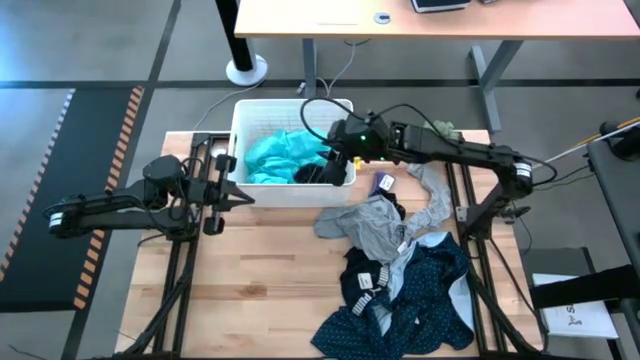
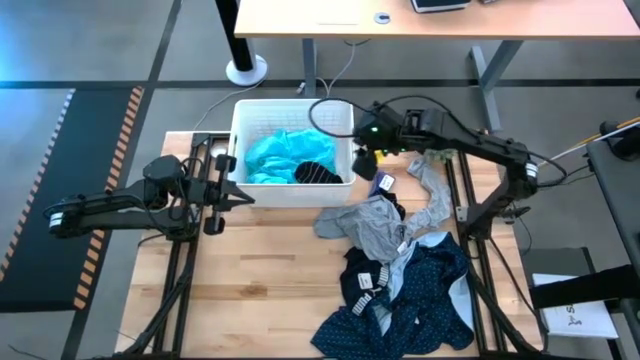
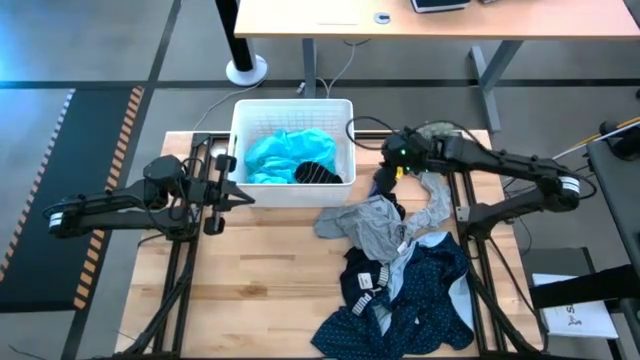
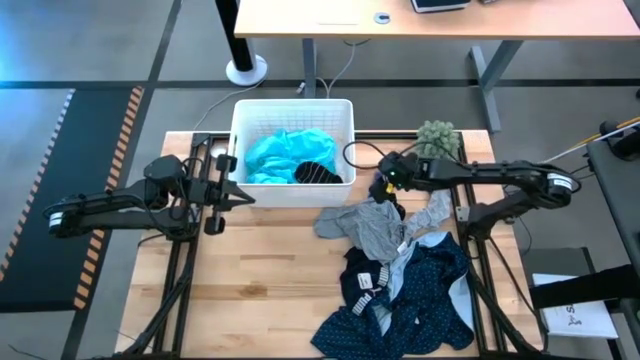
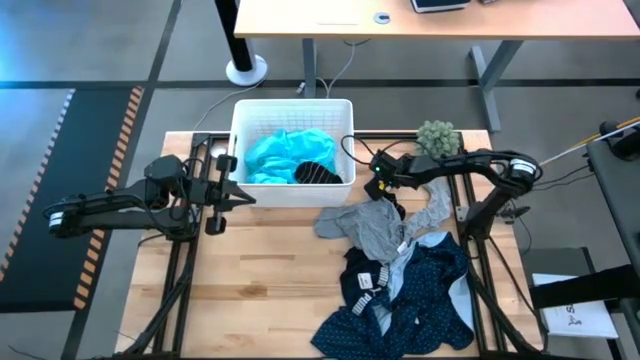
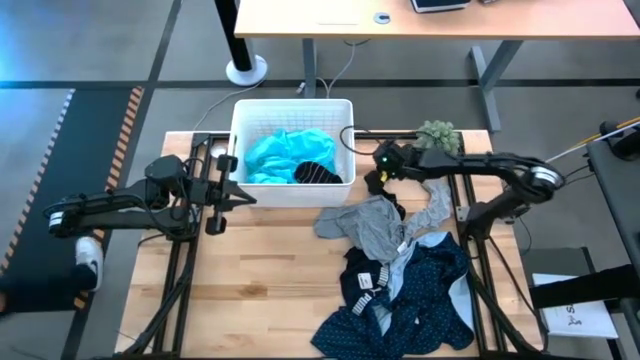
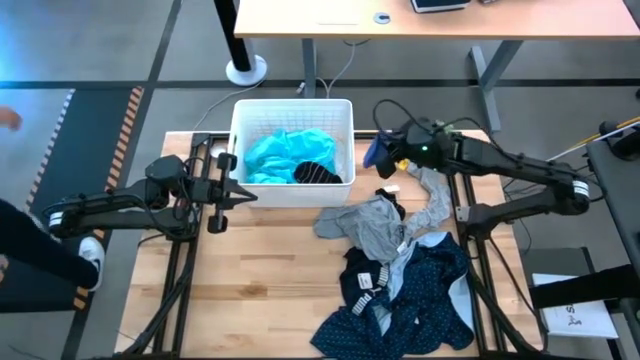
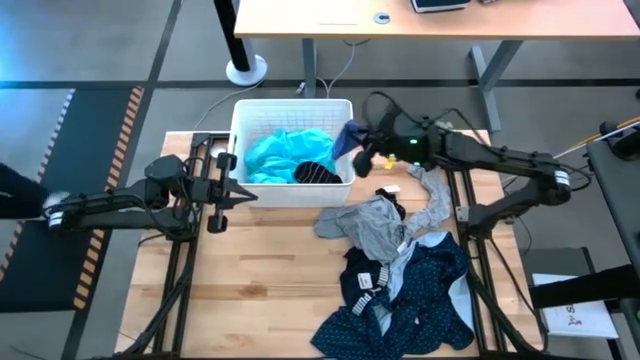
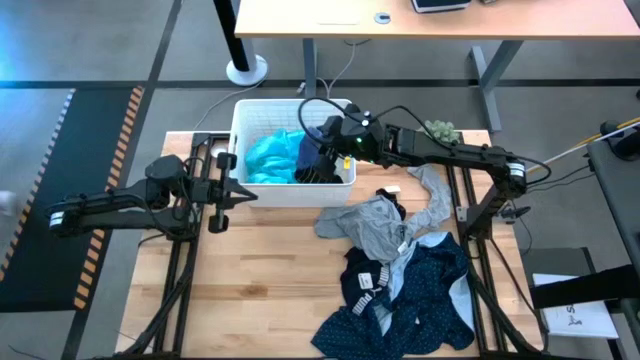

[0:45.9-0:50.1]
Task: Sort clothes
Put the top purple sock into the bin

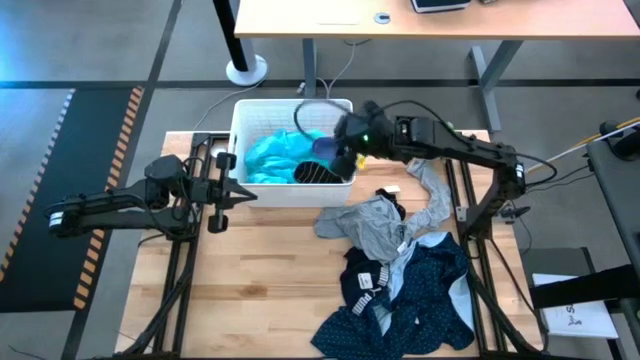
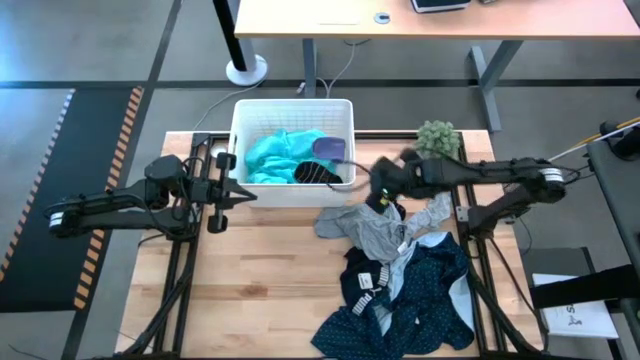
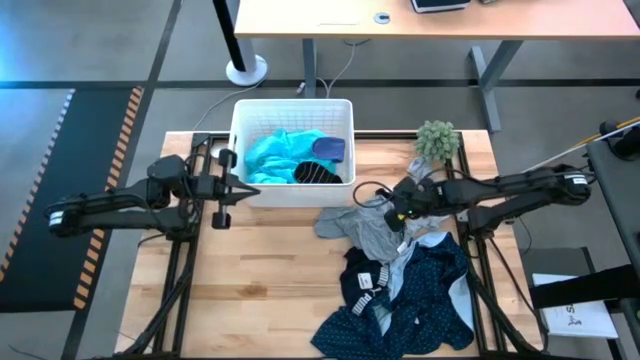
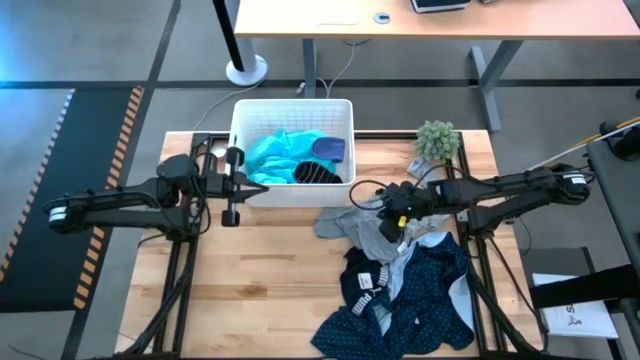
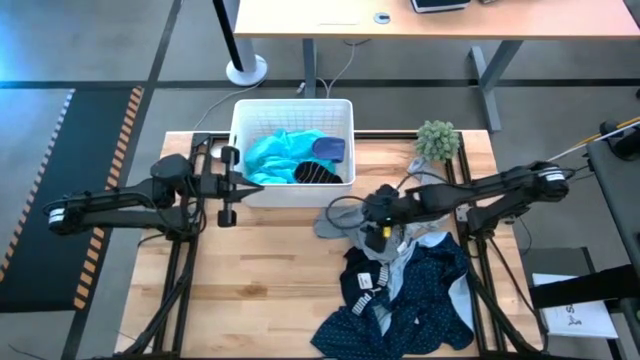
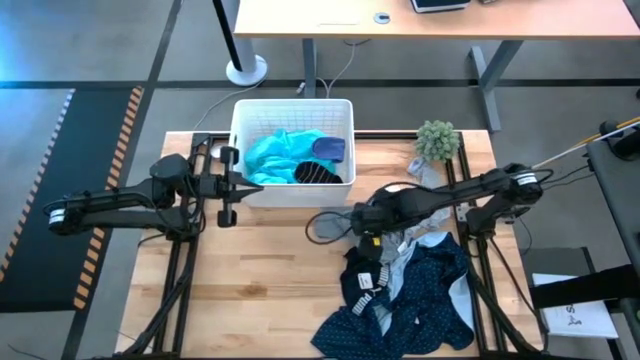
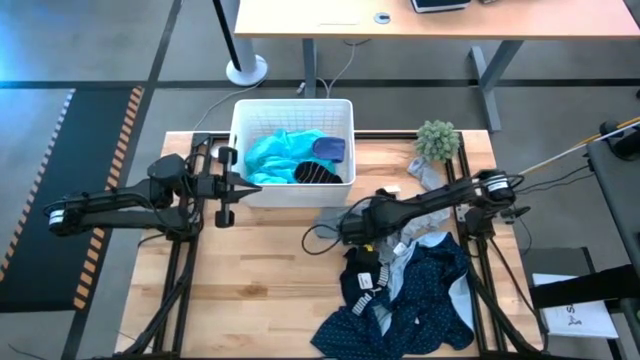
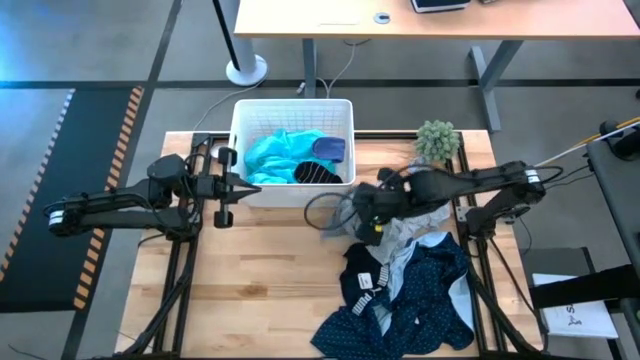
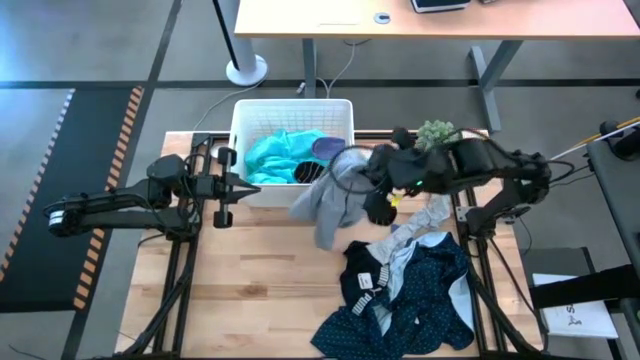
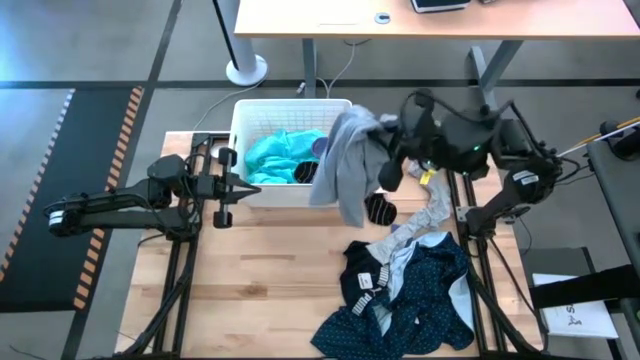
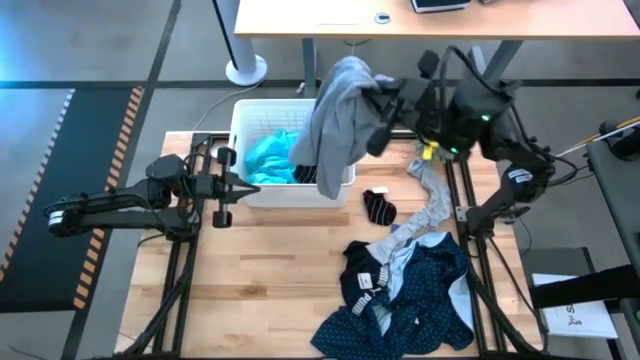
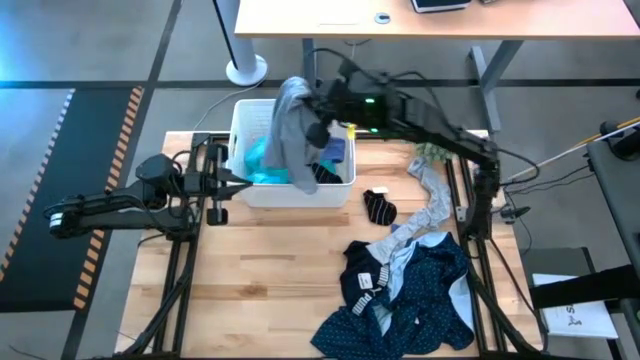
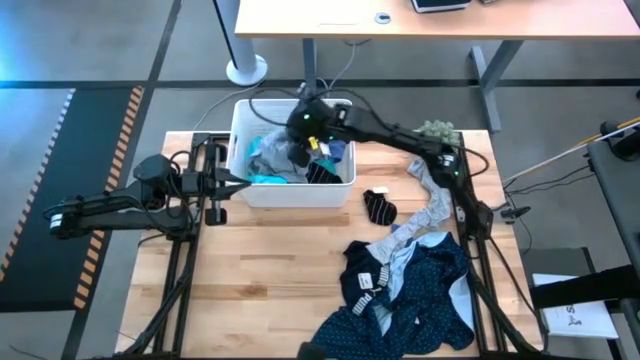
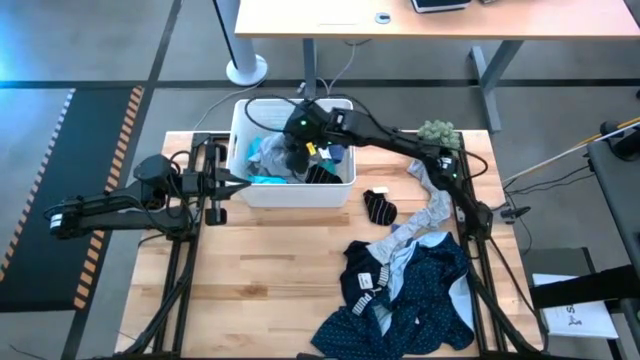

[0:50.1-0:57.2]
Put the gray shirt into the bin

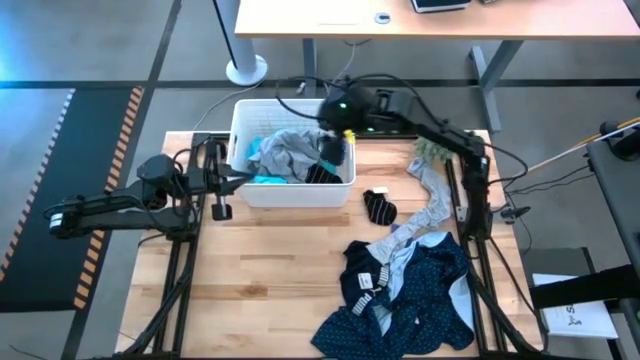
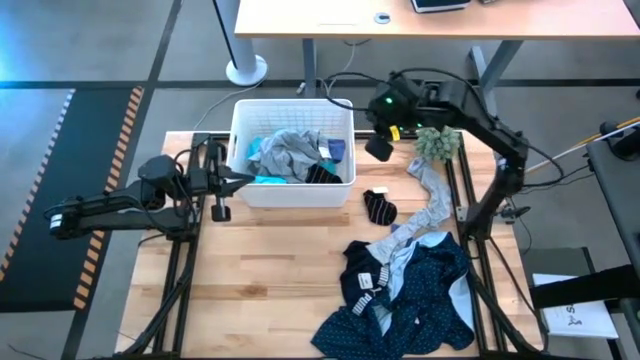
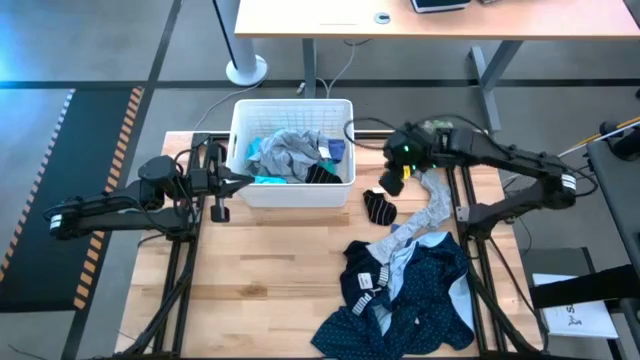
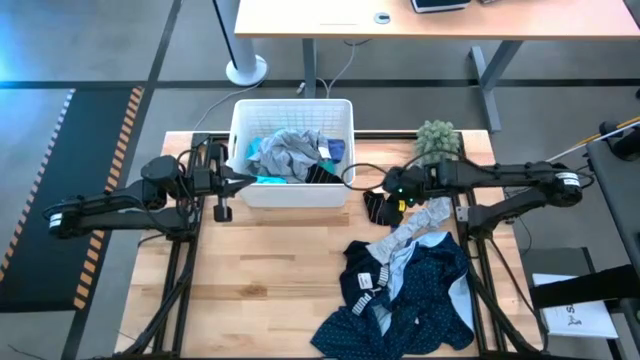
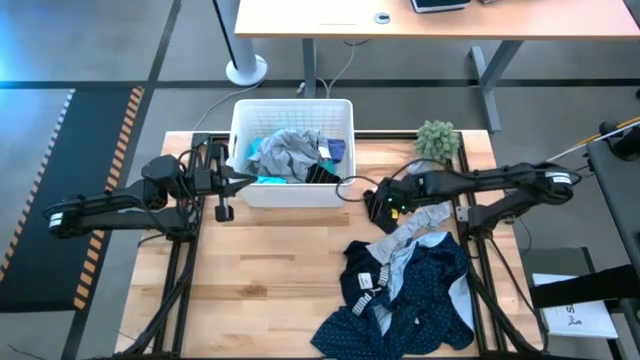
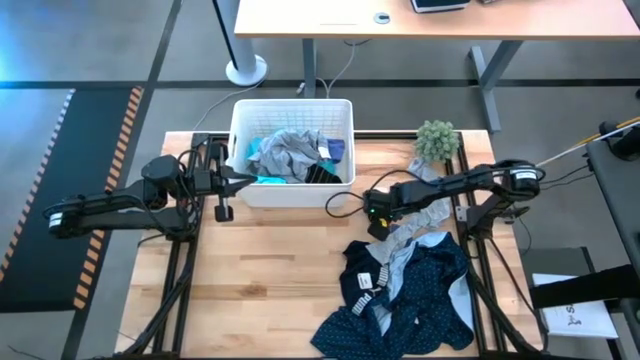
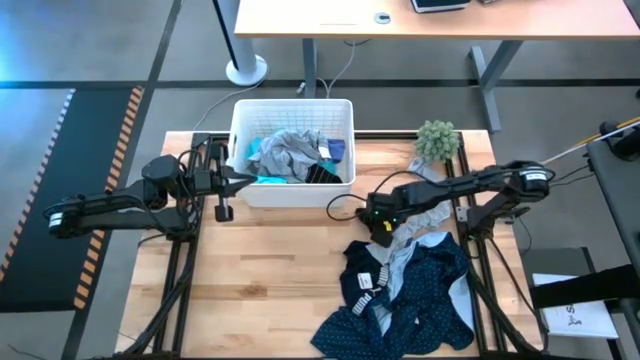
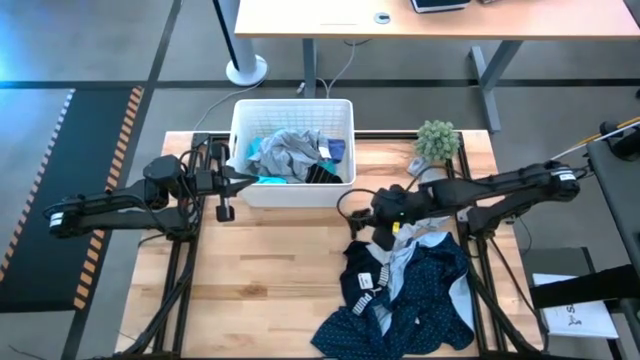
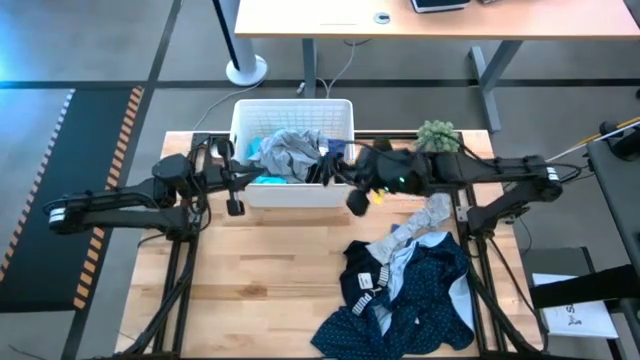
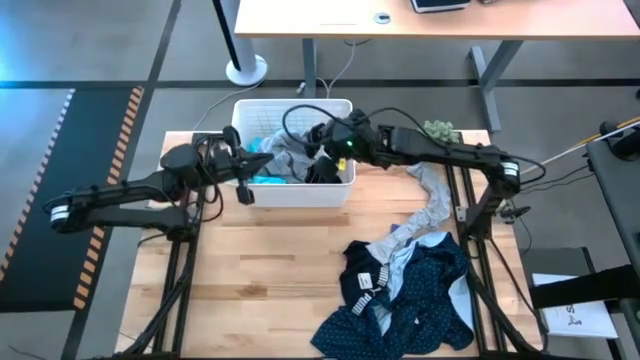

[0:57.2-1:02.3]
Put the black sock into the bin

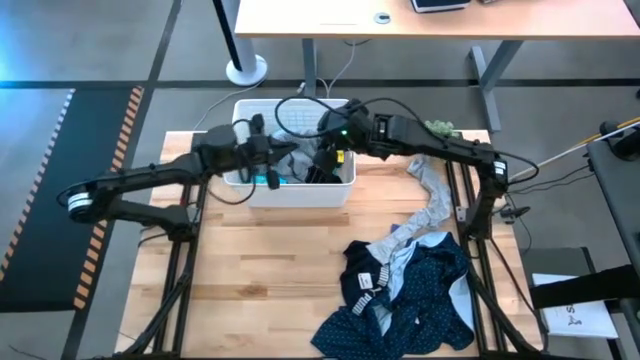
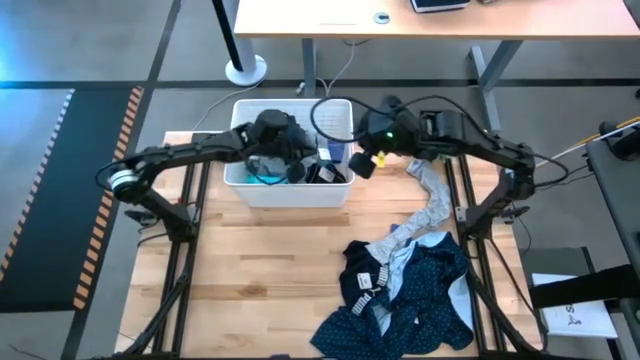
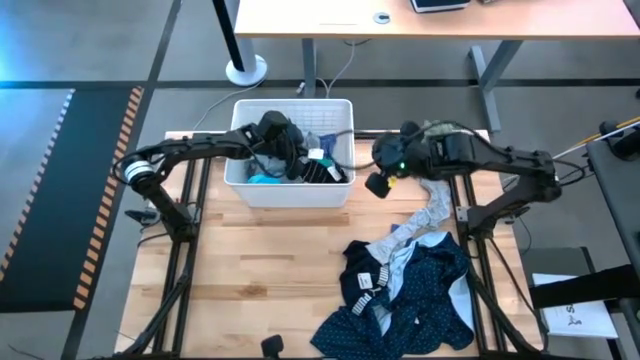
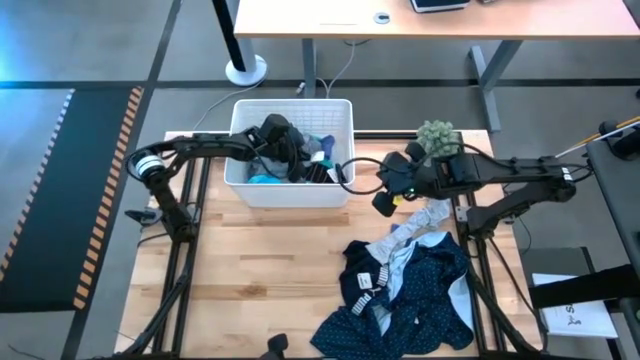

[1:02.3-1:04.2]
Adjust the clothes in the bin

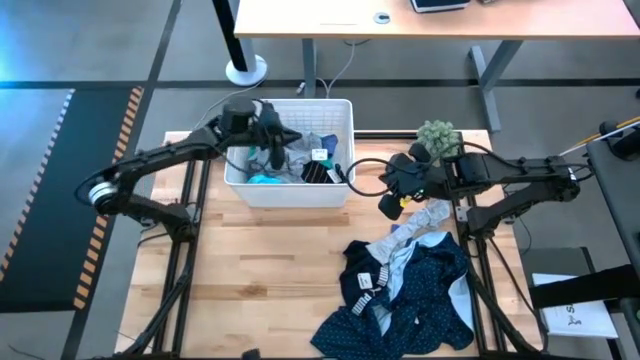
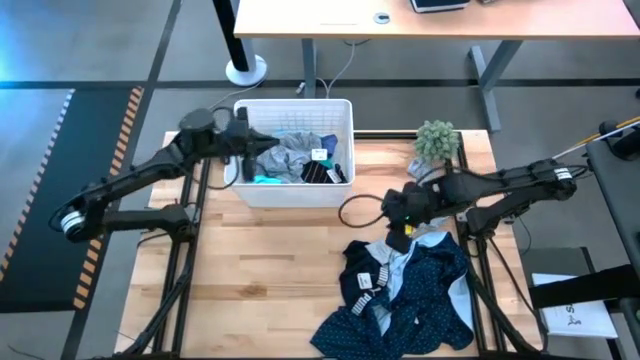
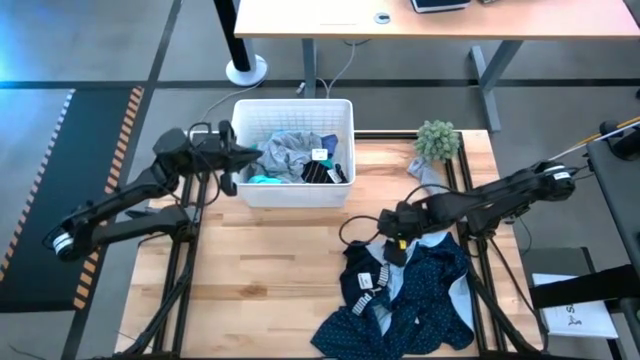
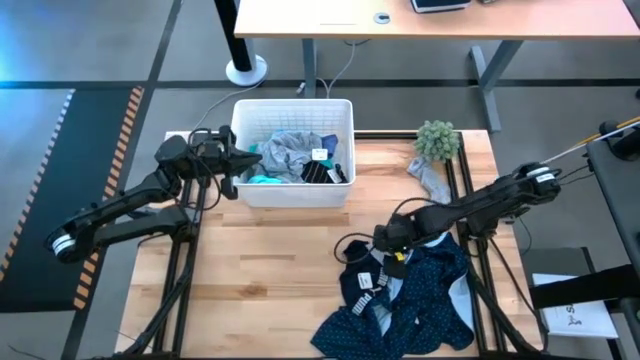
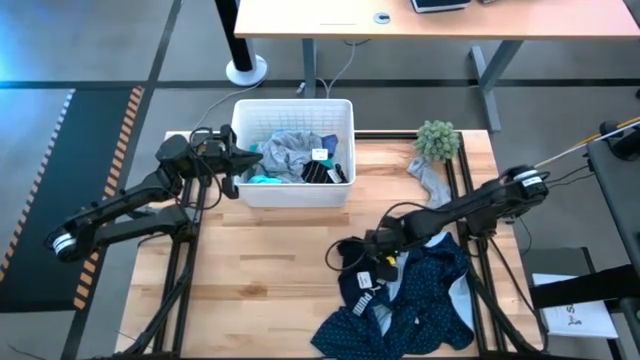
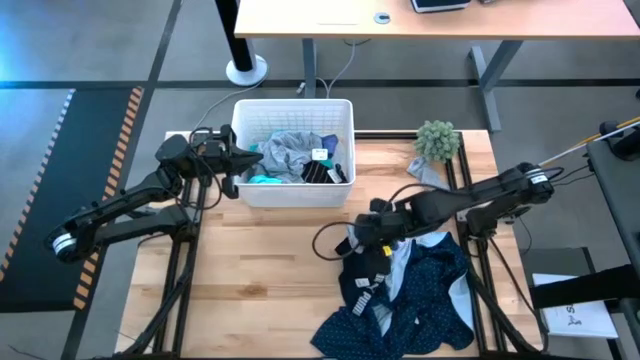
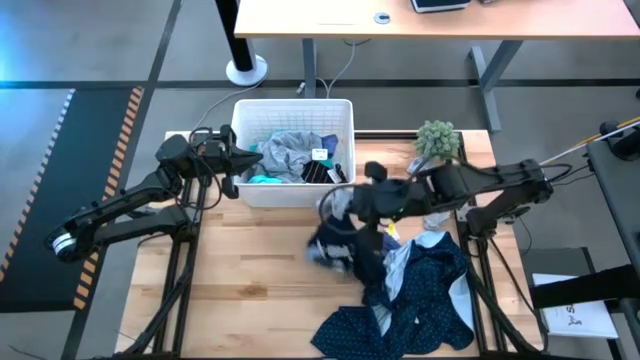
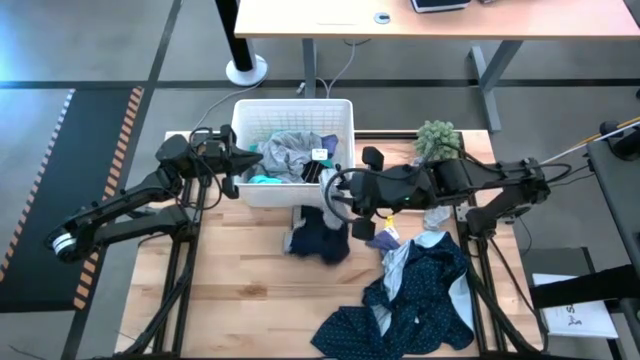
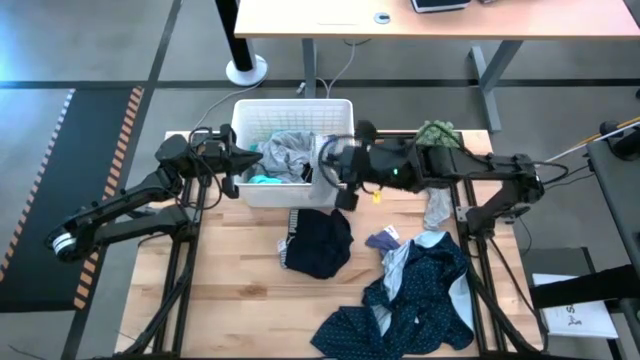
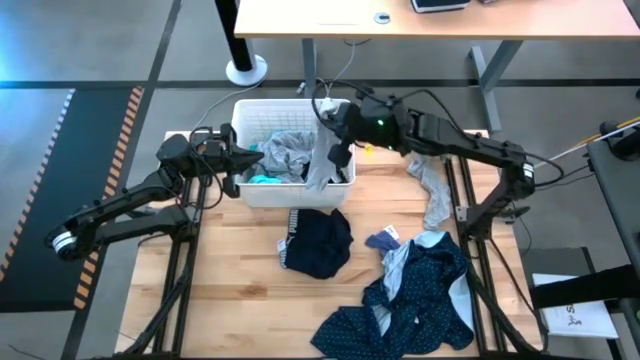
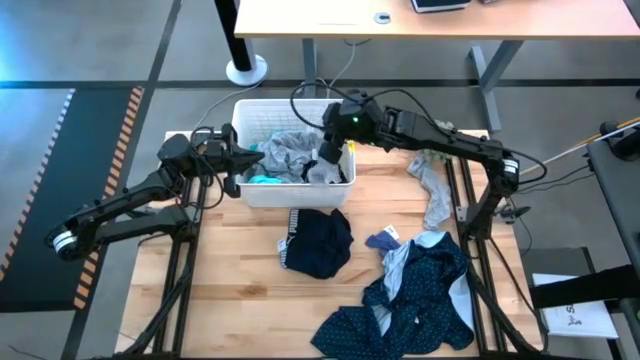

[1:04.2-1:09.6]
Put the bottom gray sock into the bin
